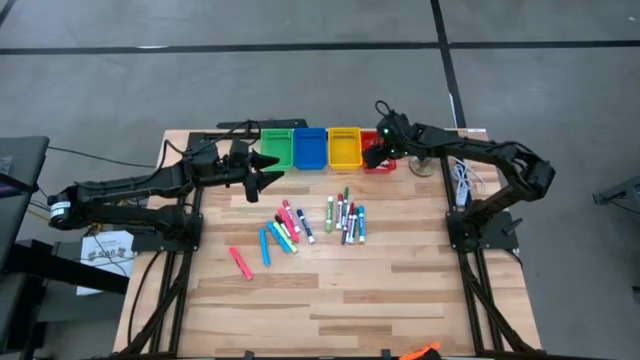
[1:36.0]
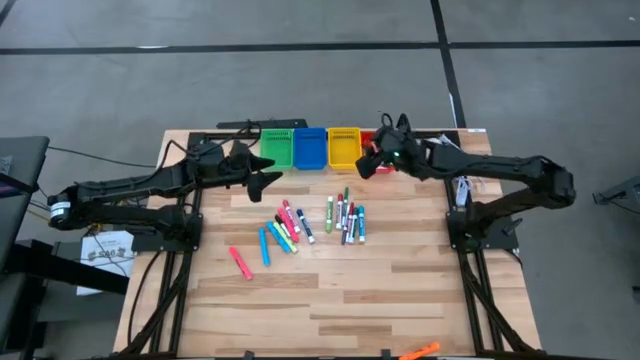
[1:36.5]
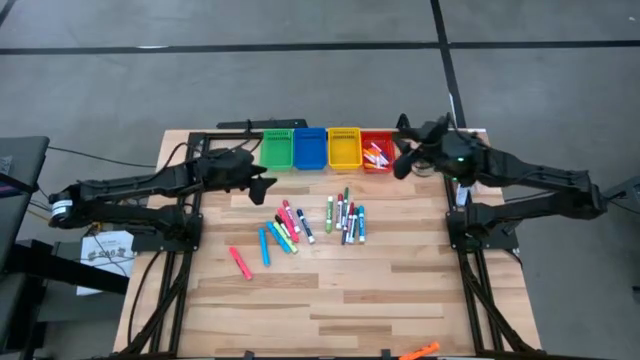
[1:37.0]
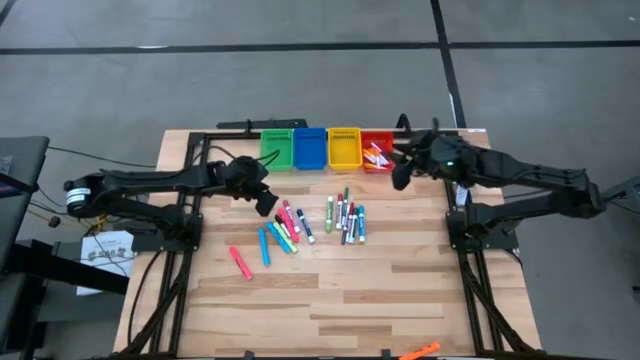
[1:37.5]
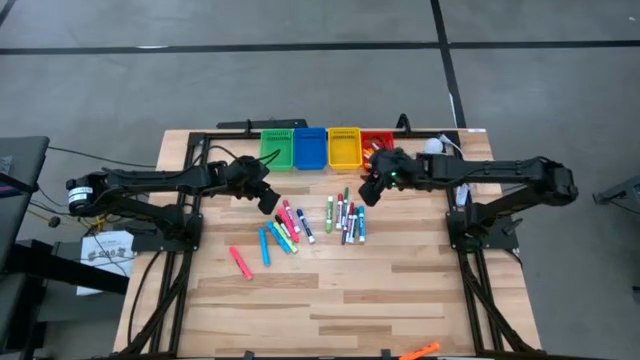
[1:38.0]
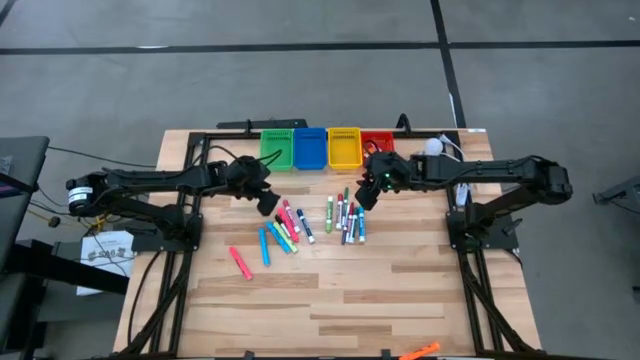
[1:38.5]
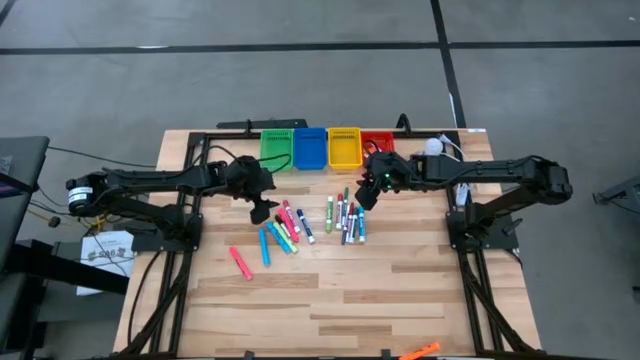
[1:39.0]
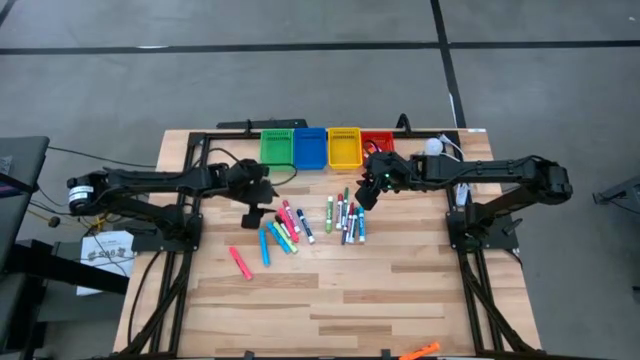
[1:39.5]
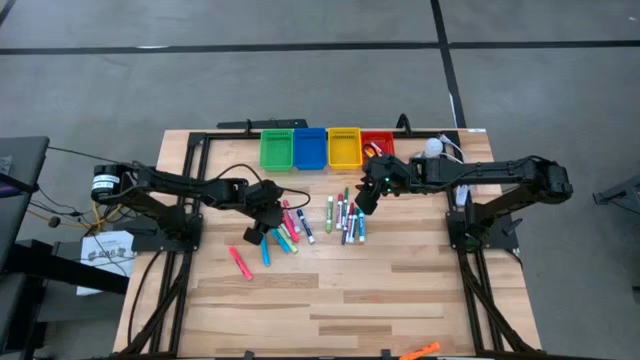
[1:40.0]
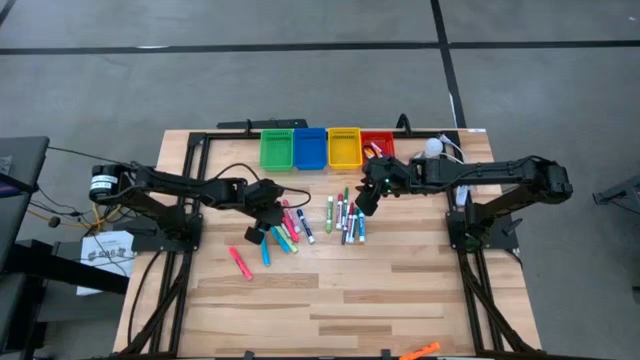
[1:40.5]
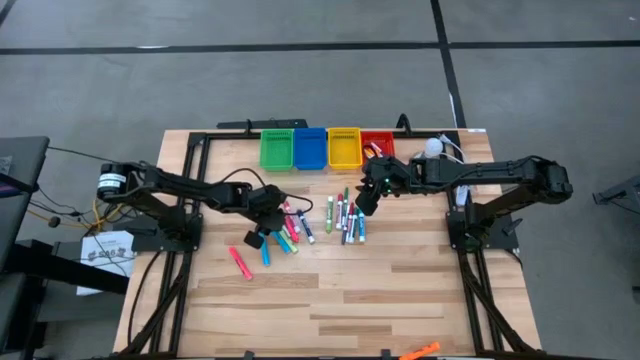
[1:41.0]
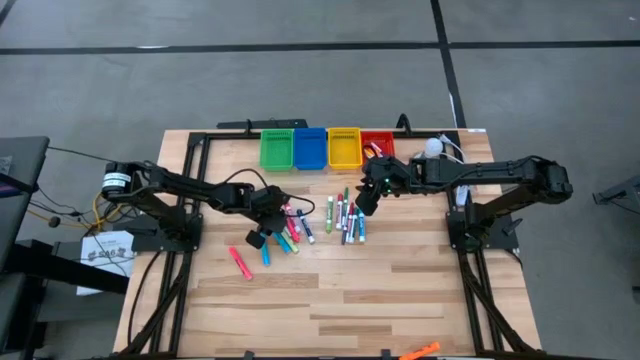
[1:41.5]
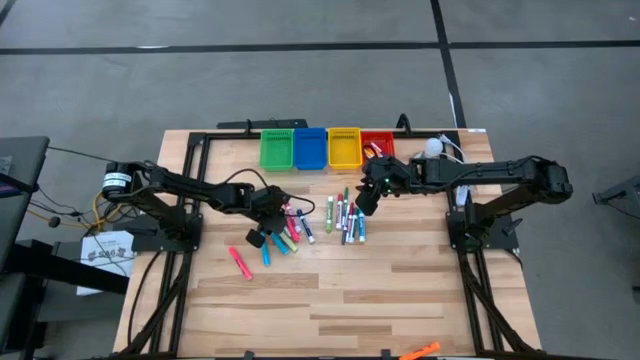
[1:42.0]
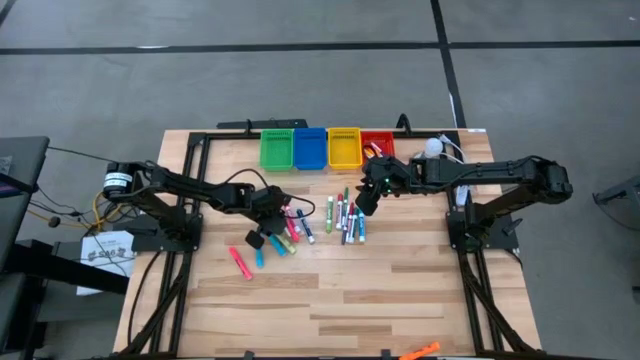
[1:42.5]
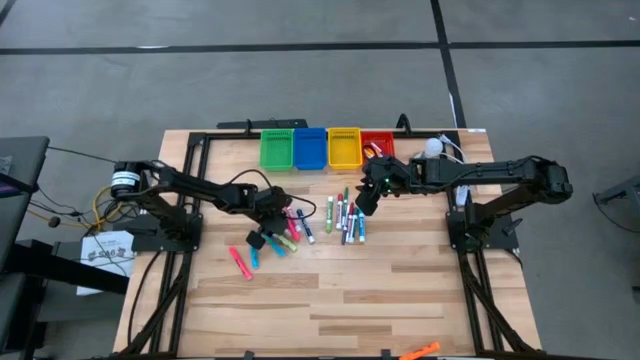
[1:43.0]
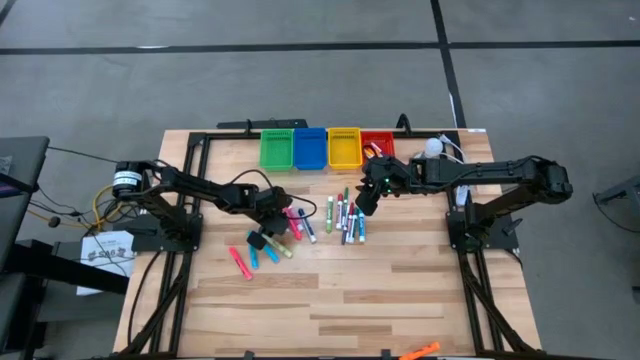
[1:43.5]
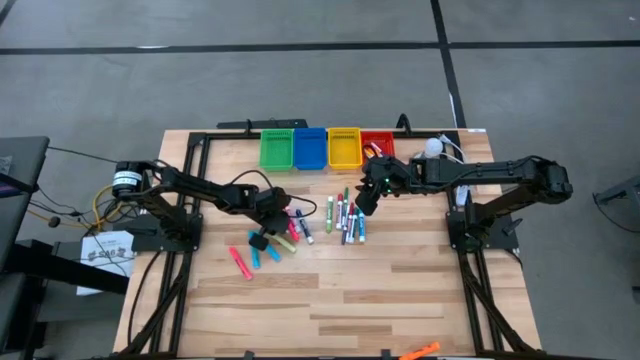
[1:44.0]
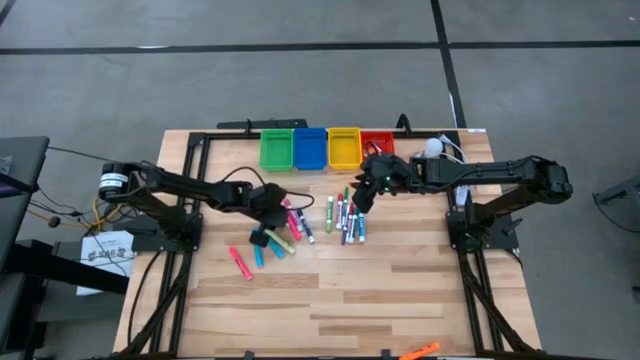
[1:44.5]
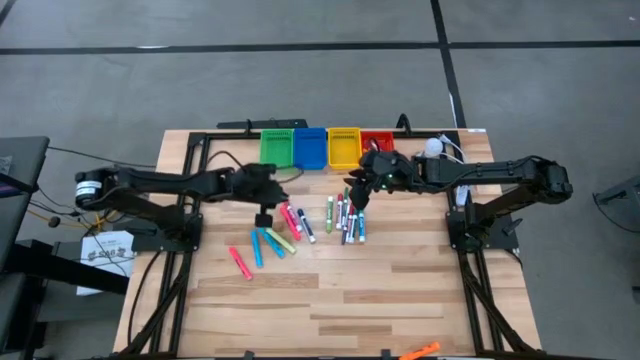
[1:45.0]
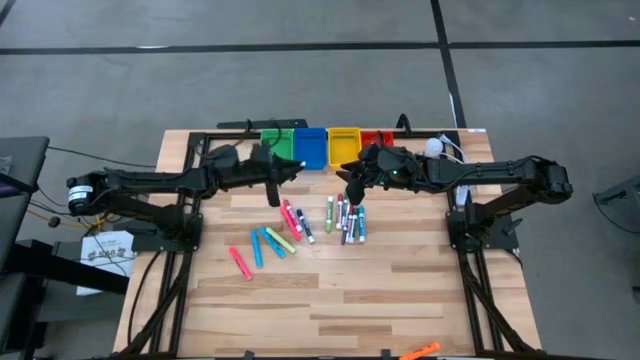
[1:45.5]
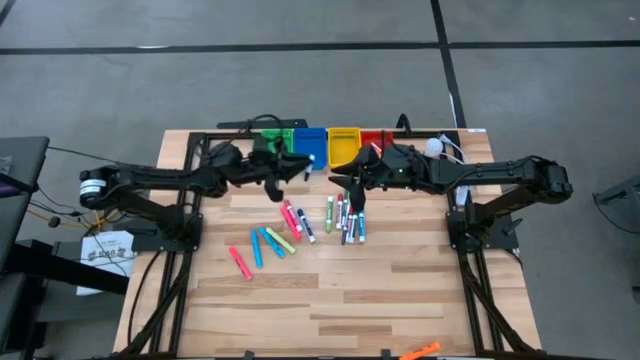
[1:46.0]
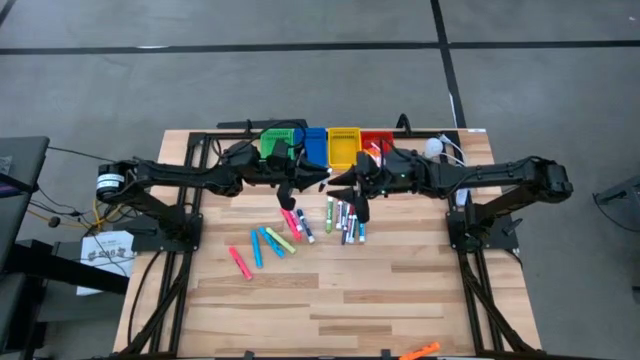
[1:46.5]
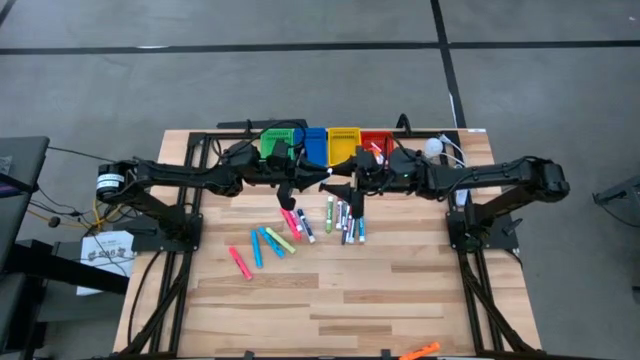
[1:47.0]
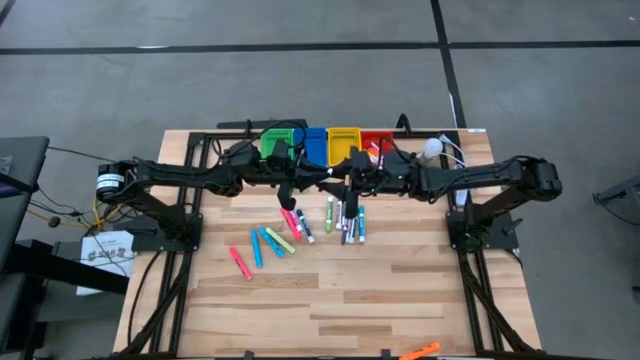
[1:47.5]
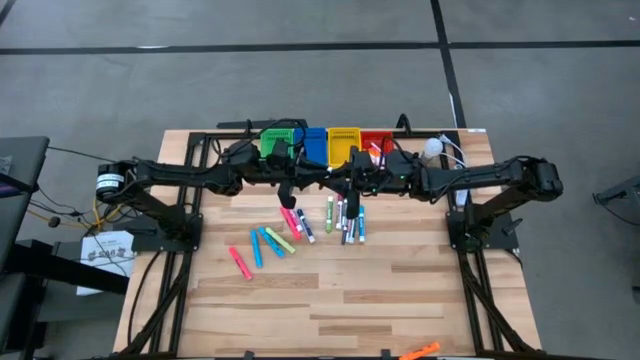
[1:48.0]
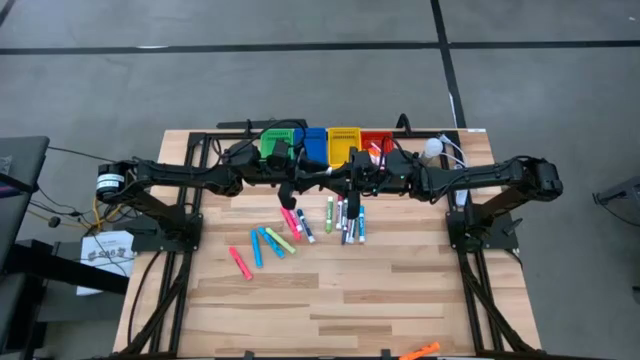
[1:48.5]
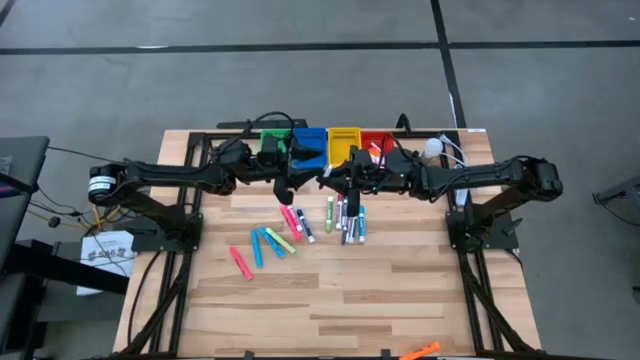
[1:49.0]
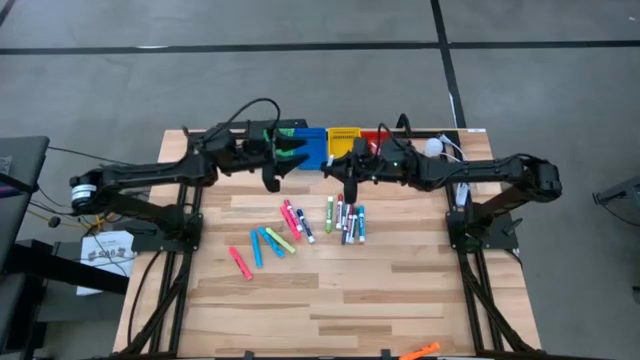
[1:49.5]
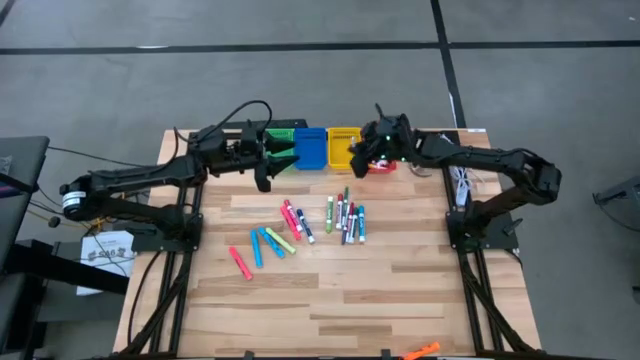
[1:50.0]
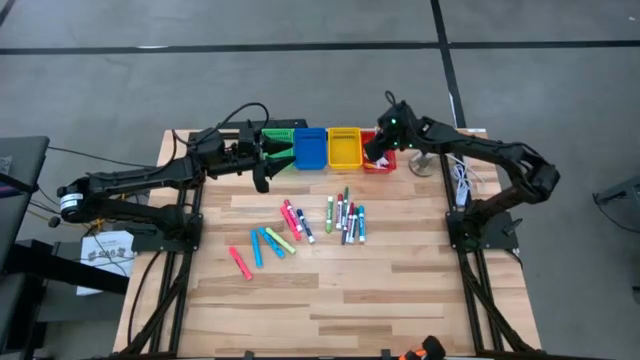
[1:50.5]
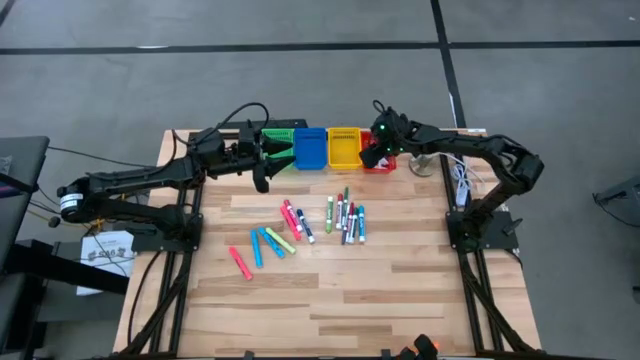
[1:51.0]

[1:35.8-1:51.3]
Task: Pick & Place Markers
Put the black mini marker into the red basket

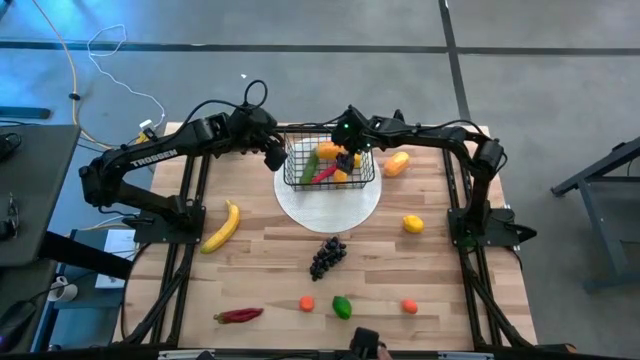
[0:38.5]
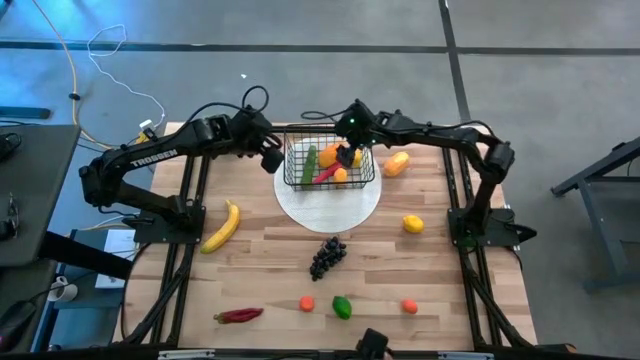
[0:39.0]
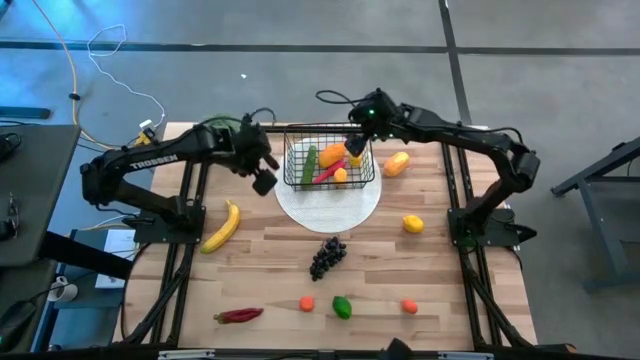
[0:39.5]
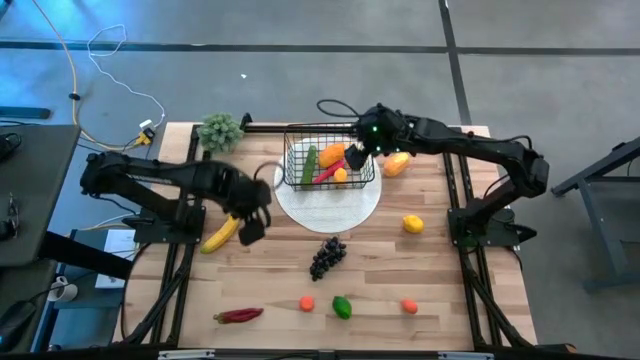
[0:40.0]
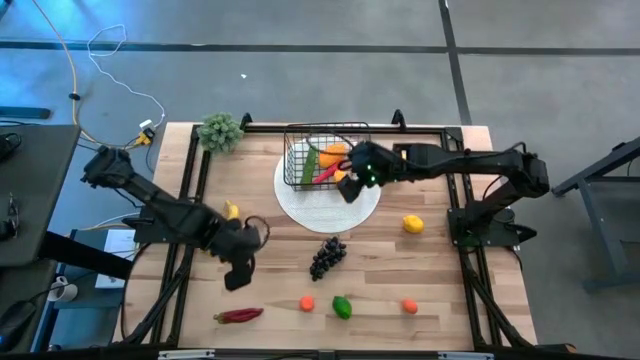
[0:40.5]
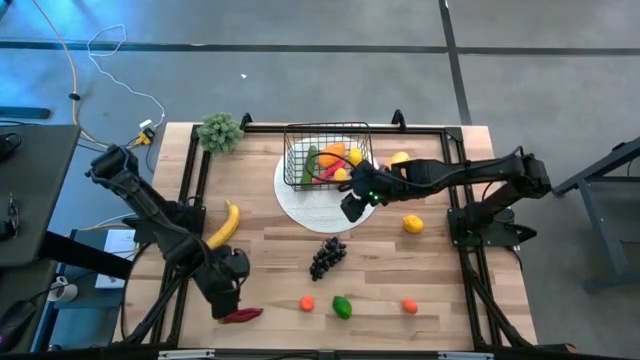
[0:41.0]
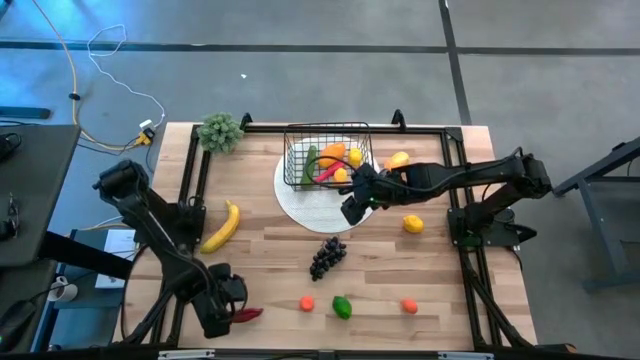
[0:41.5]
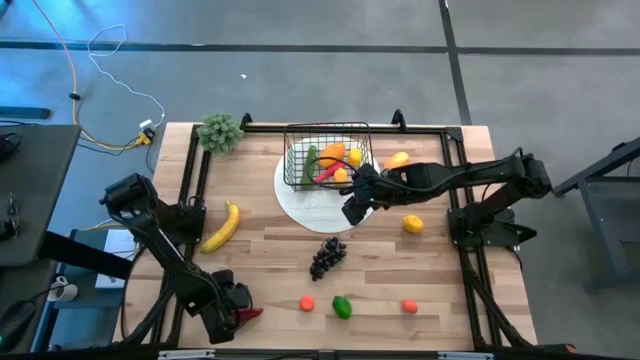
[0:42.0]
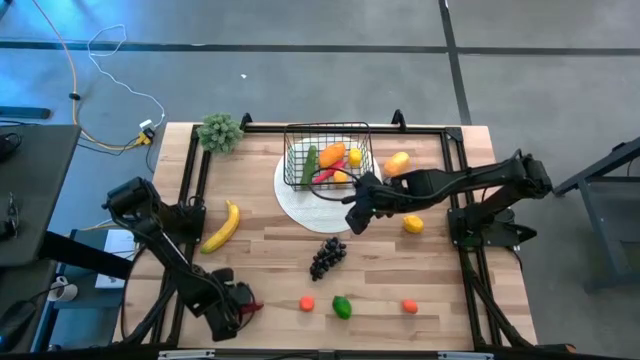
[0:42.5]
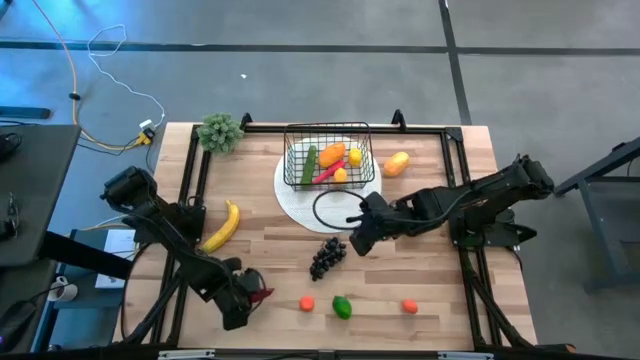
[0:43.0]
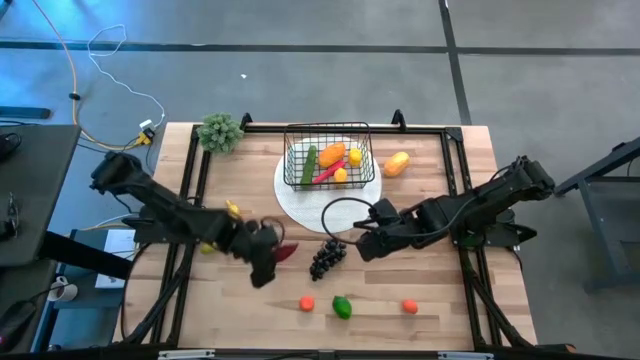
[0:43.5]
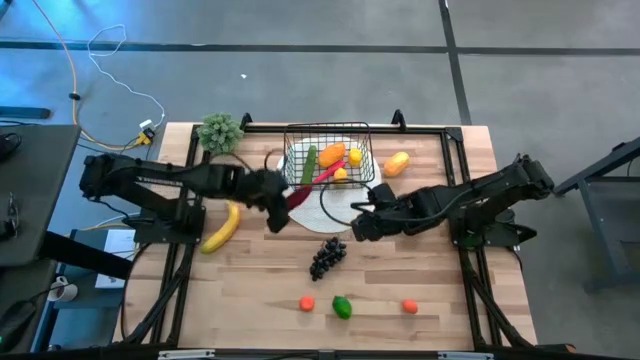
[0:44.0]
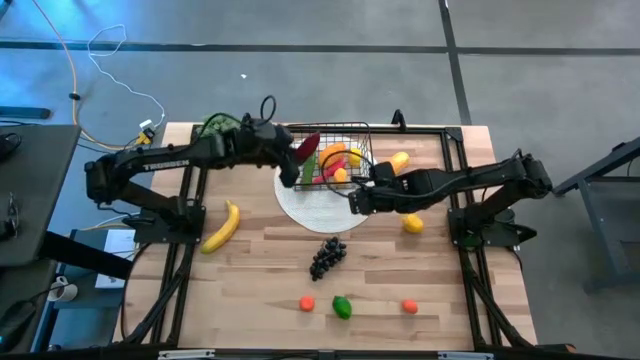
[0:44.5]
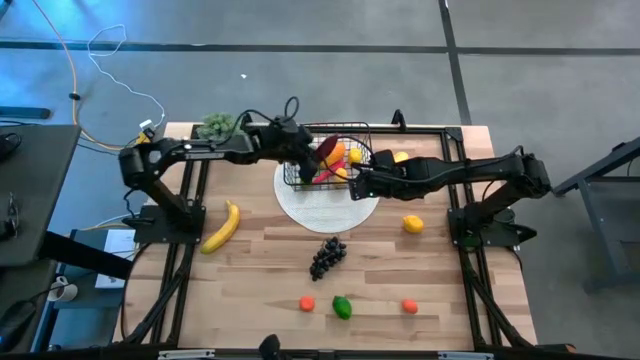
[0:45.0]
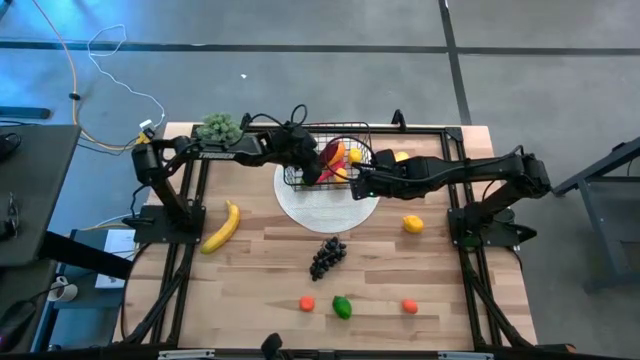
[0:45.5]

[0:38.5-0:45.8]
Task: Build produce basket
Put the red chili pepper into the black wire basket
